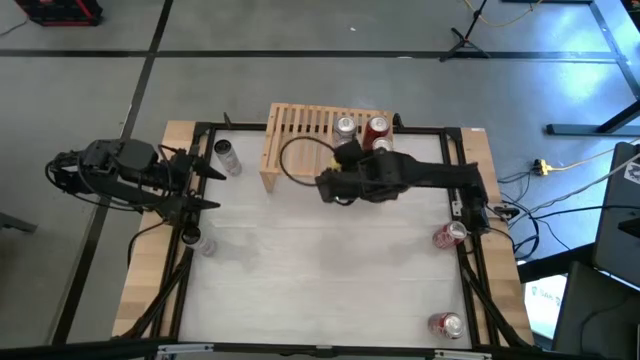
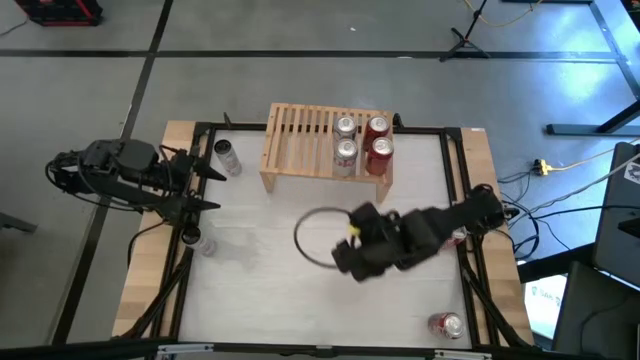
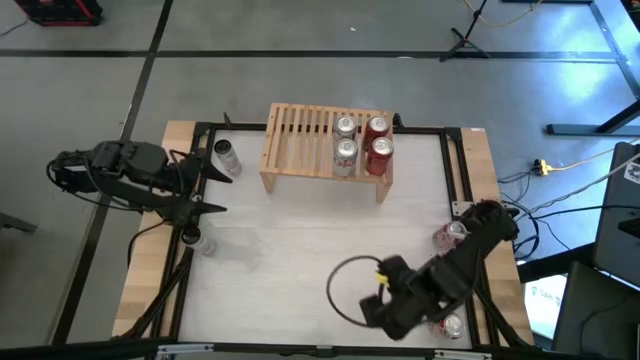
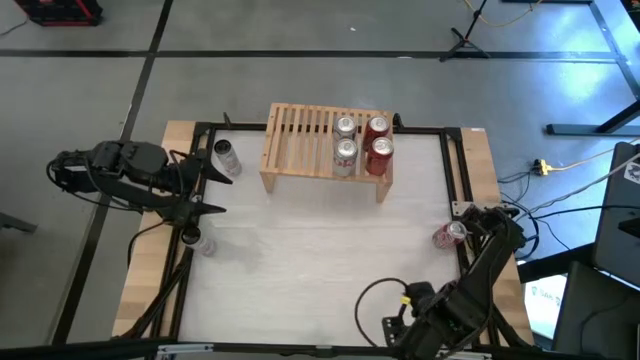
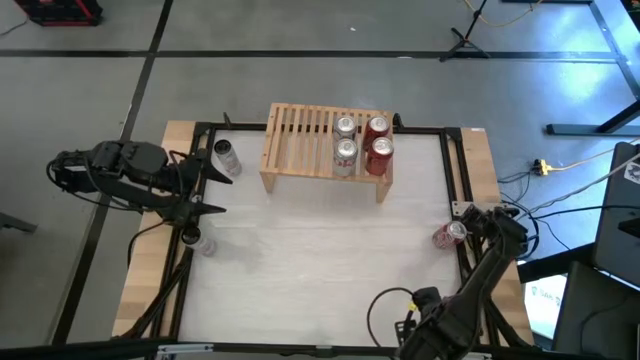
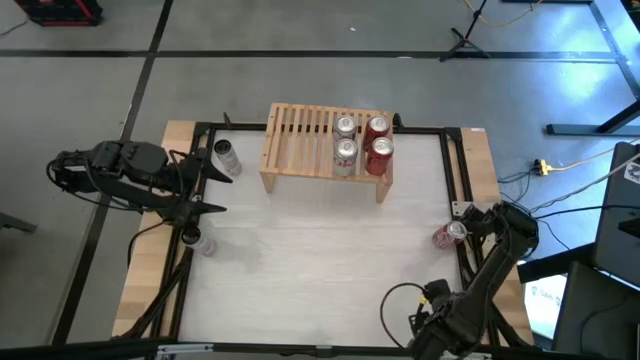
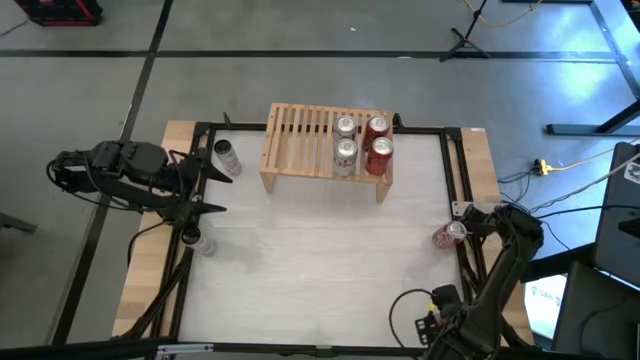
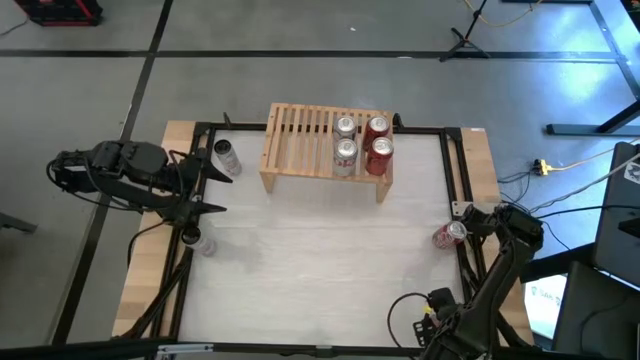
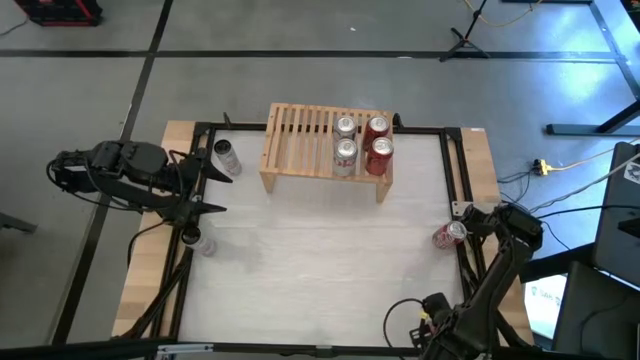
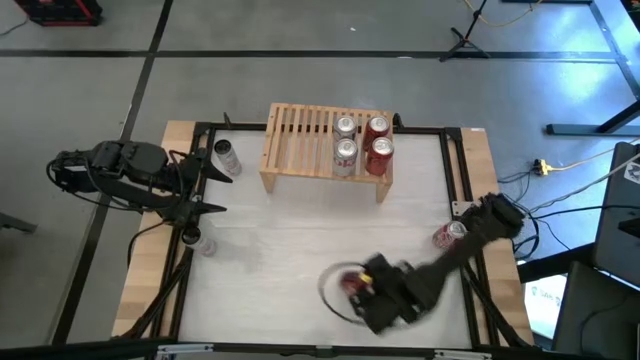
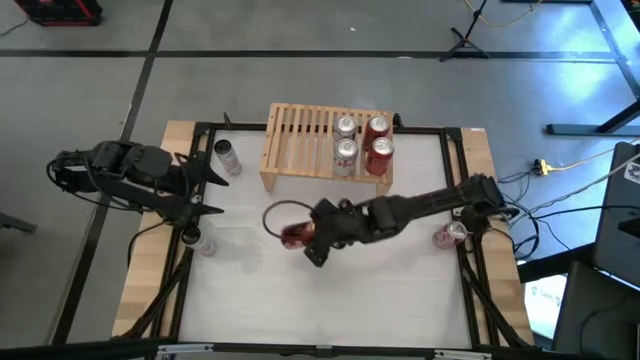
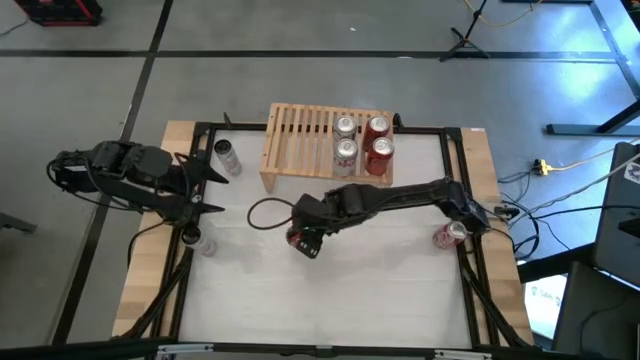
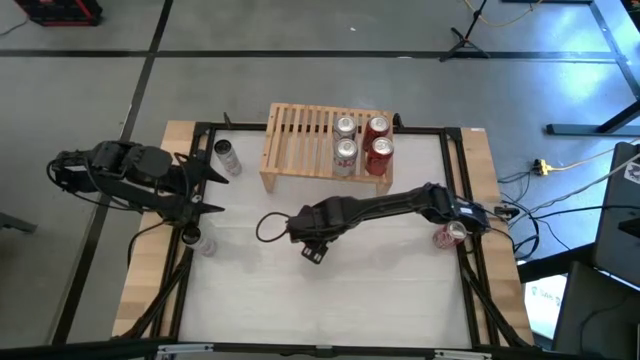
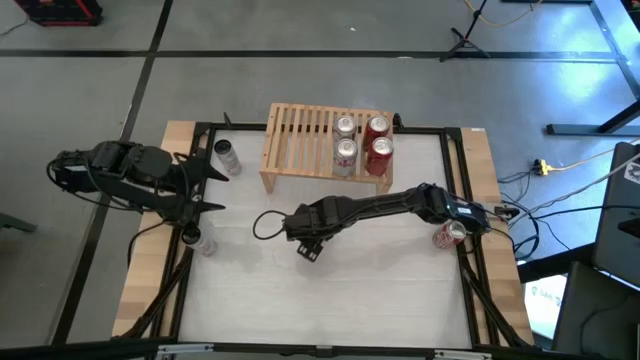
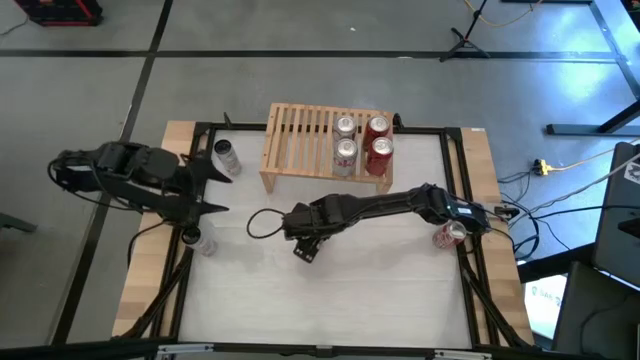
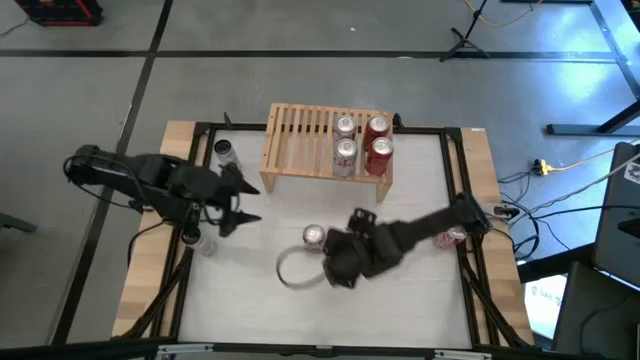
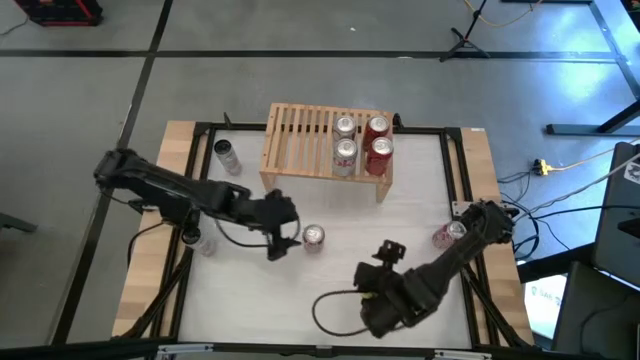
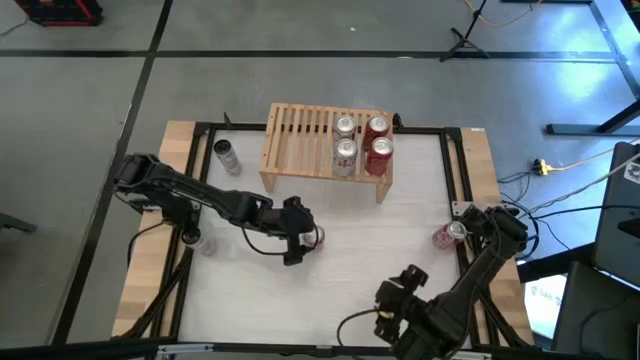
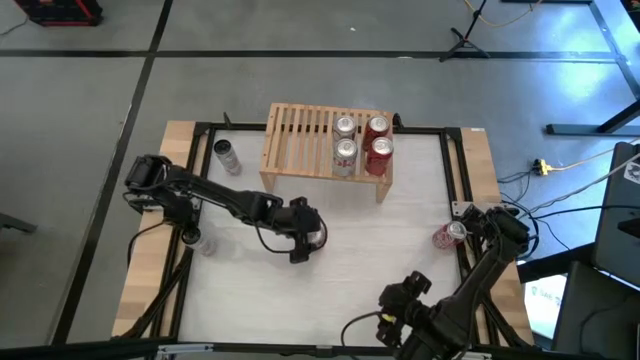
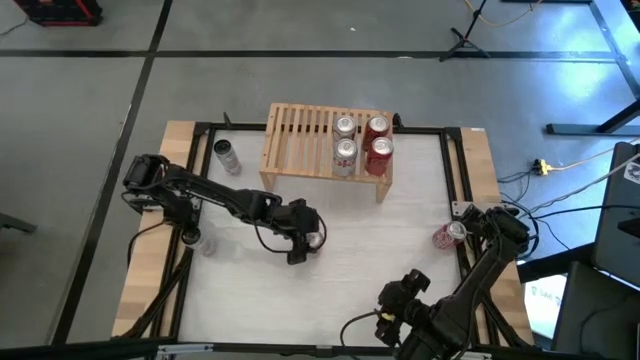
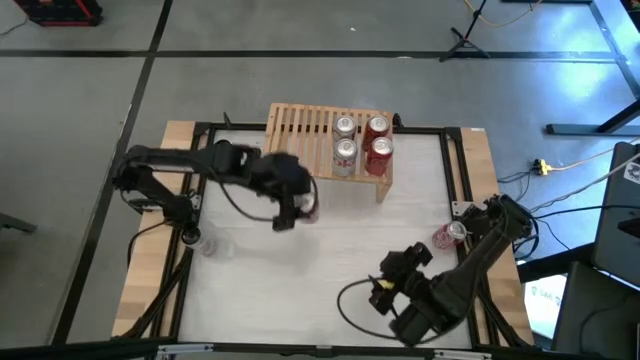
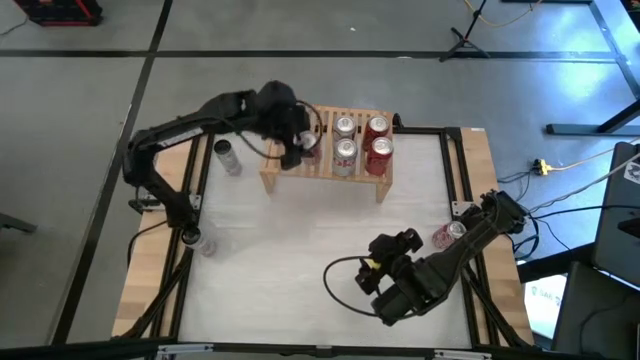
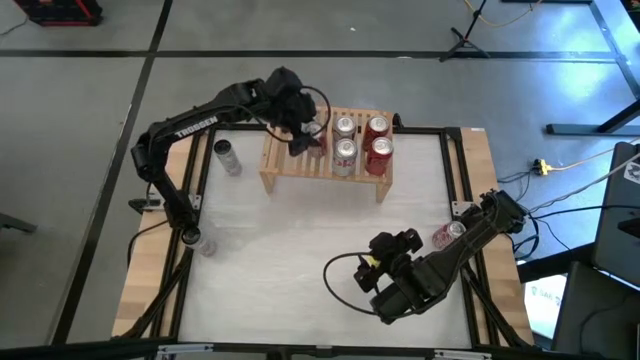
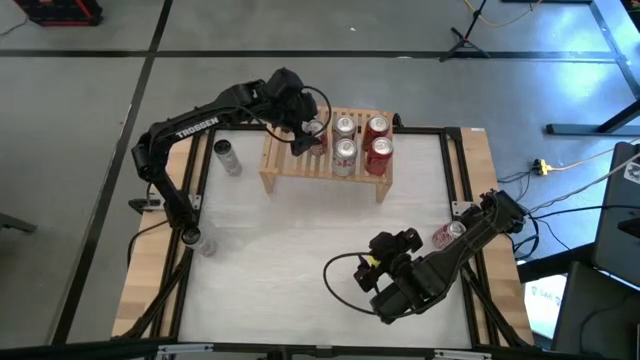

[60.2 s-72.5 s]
Task: Place canned beverage on shelf
Put the bottom red and white soda can on the shelf

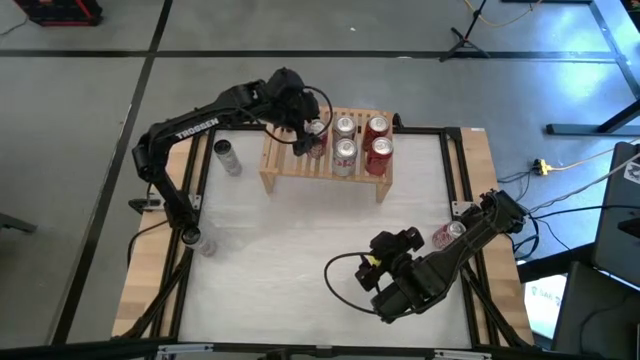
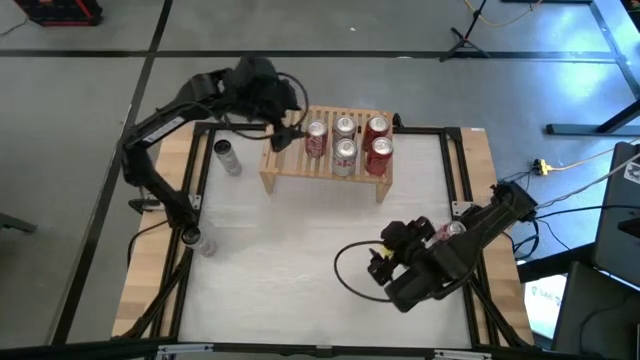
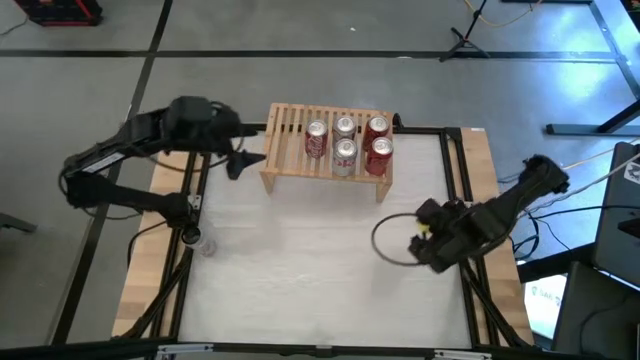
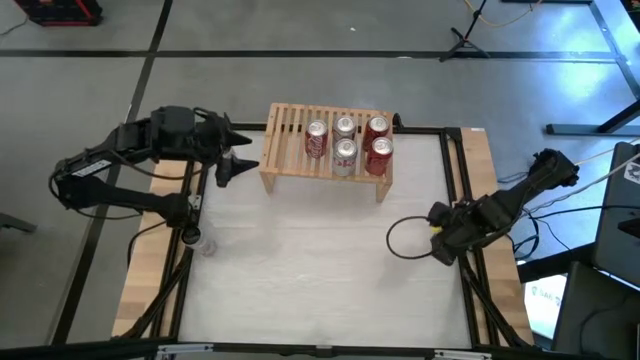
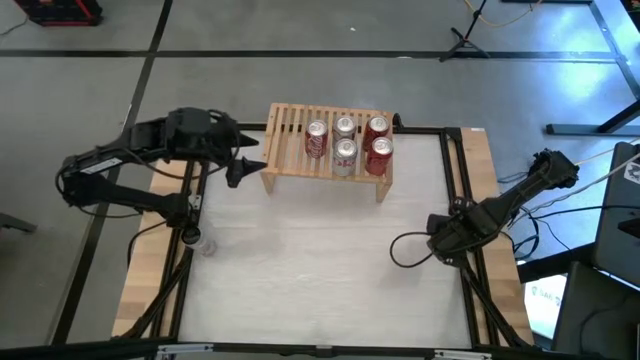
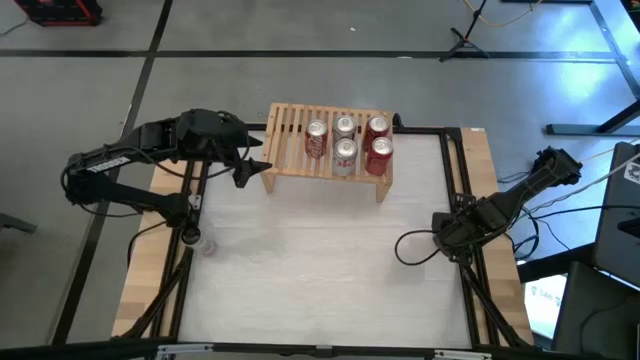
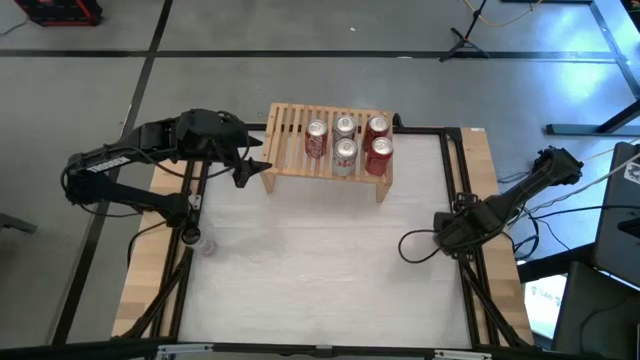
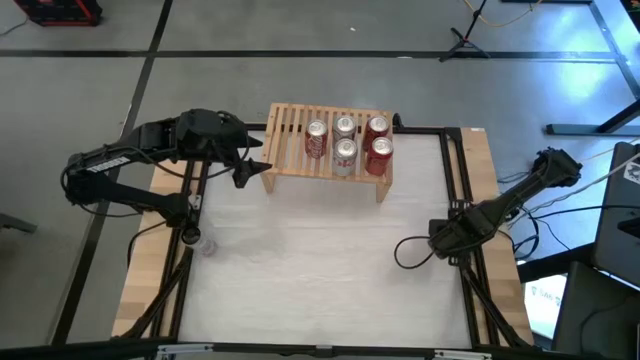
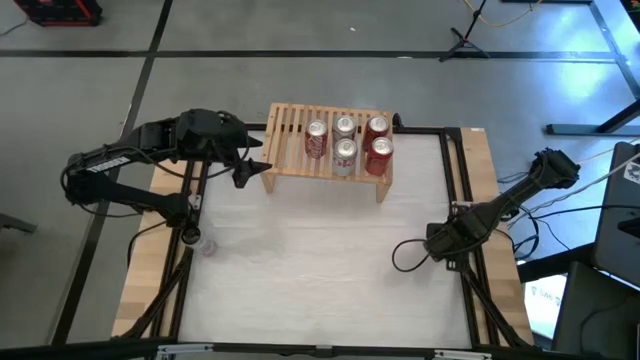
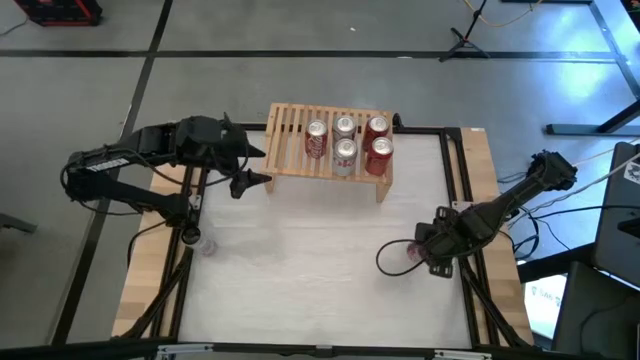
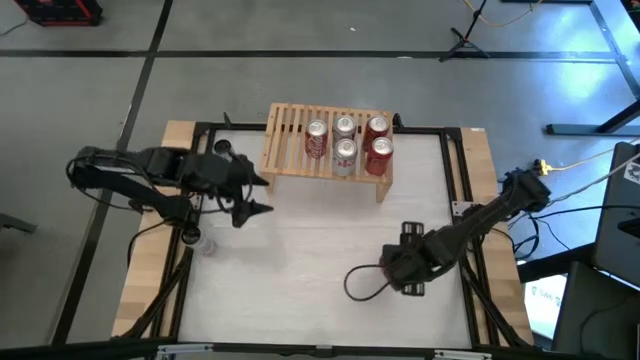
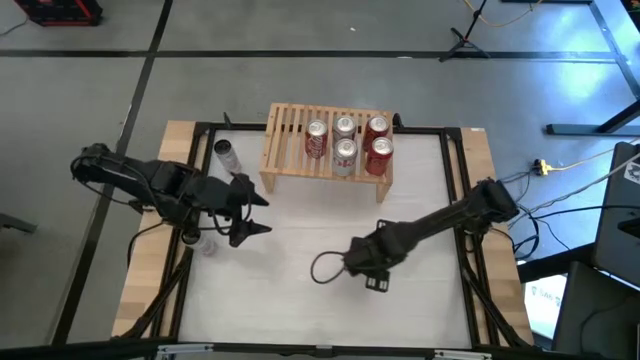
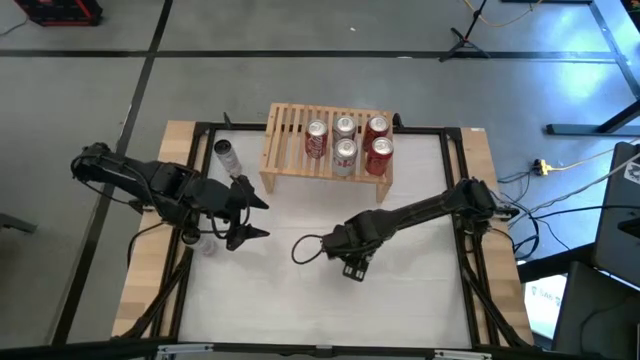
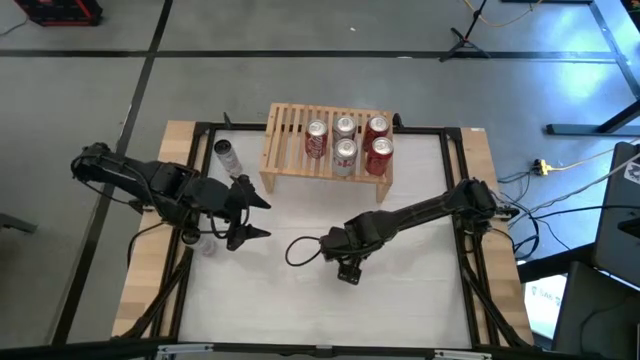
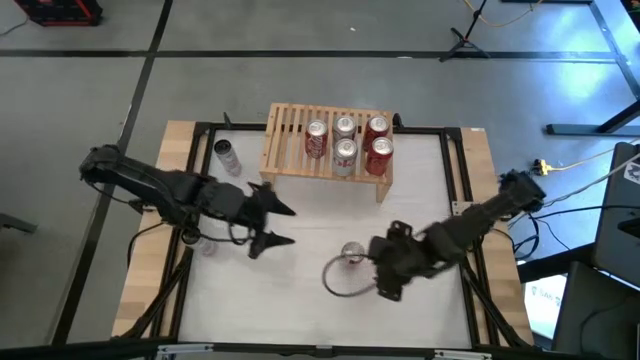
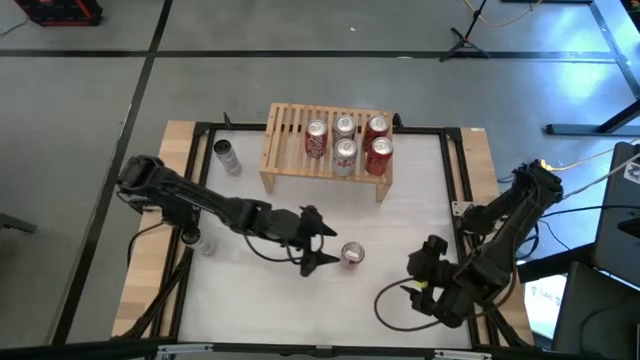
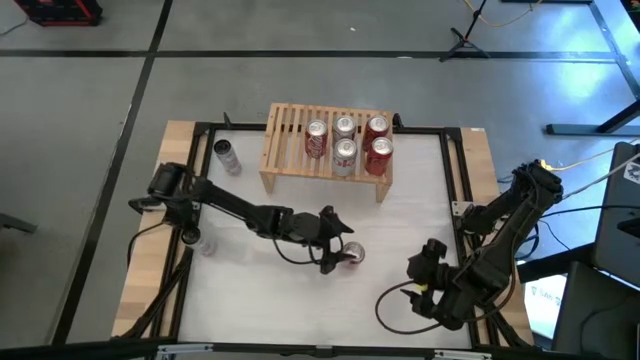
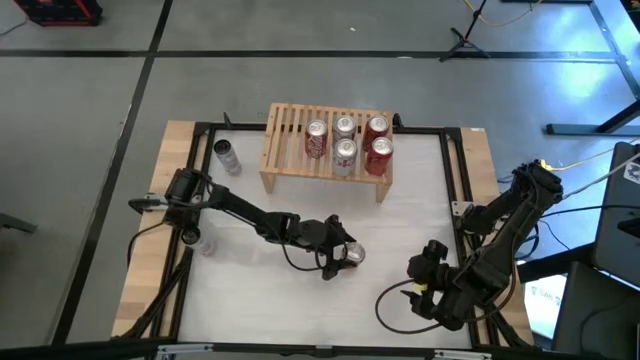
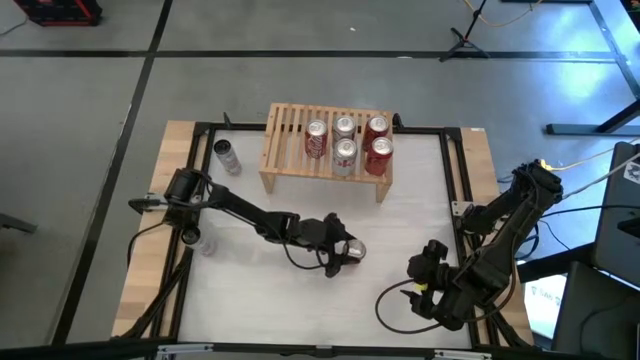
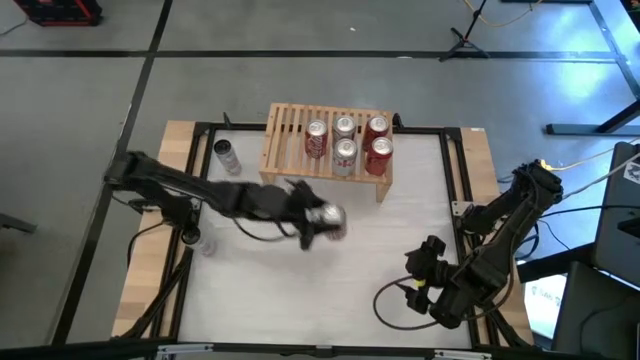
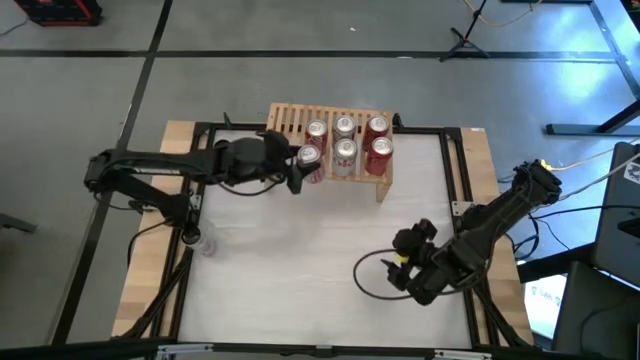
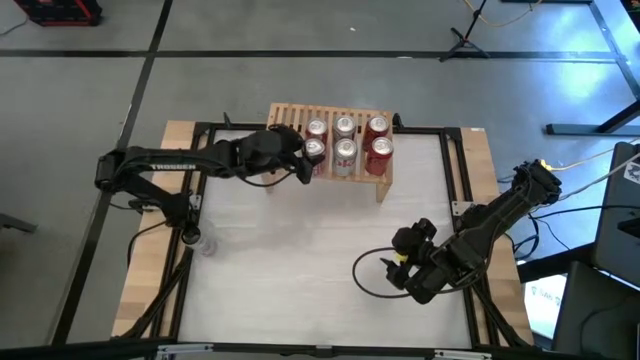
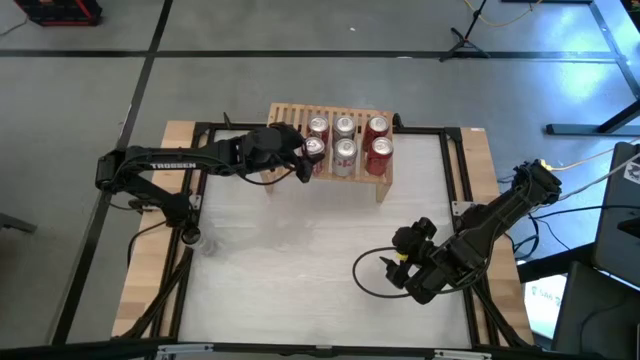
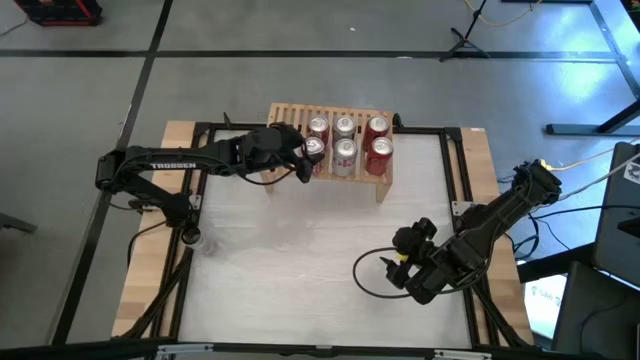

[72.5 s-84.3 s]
Put the red and white soda can on the shelf aligned with the other red and white soda can
